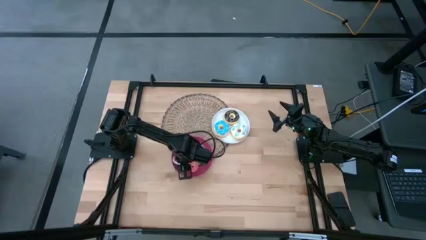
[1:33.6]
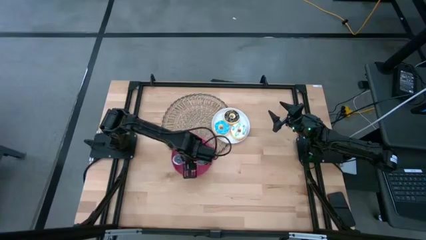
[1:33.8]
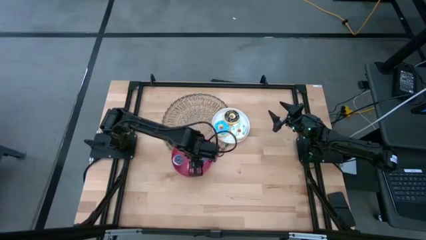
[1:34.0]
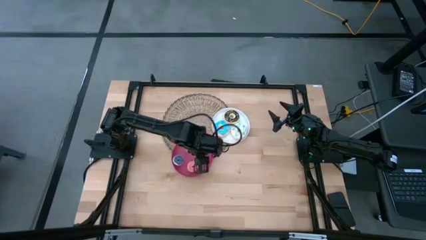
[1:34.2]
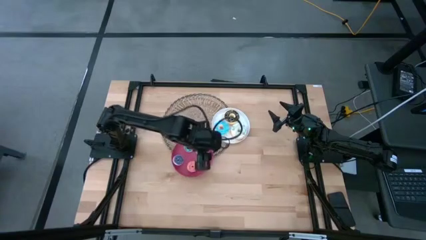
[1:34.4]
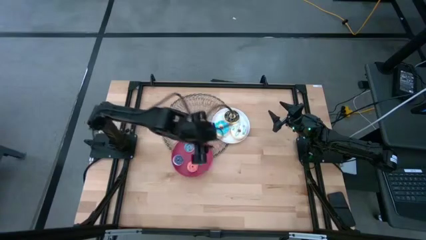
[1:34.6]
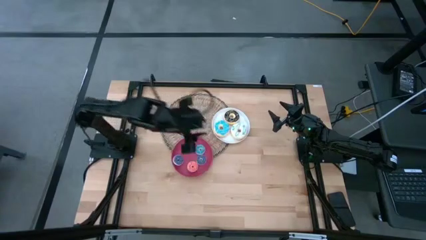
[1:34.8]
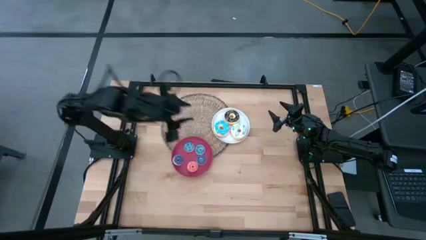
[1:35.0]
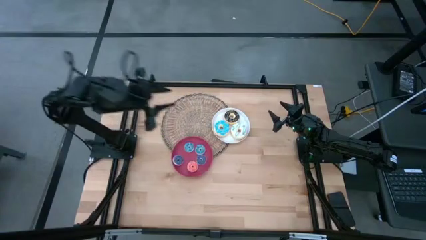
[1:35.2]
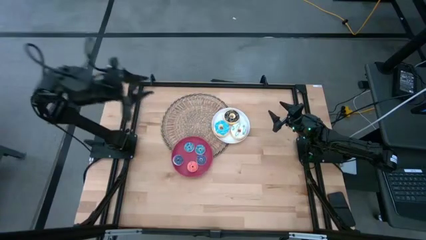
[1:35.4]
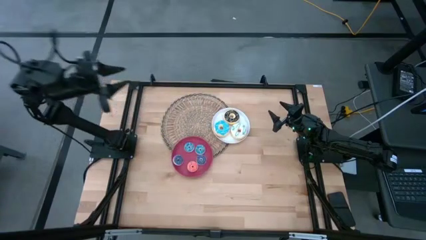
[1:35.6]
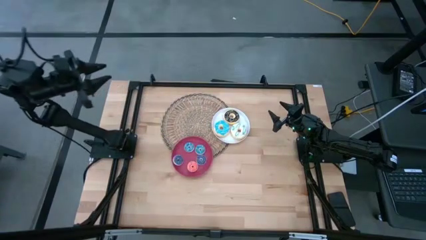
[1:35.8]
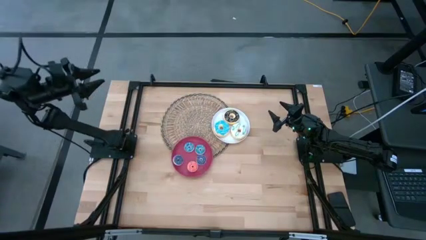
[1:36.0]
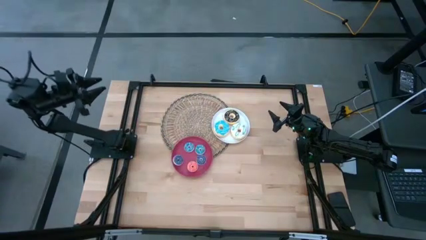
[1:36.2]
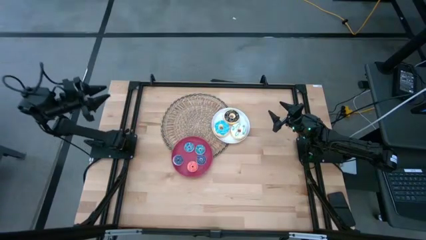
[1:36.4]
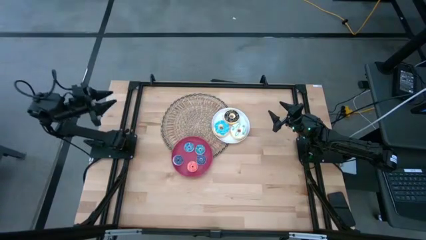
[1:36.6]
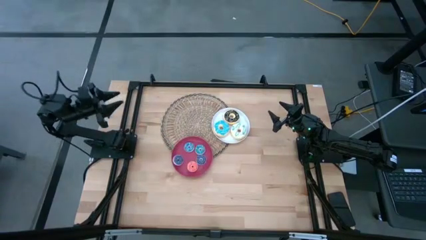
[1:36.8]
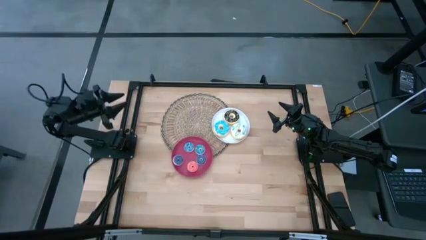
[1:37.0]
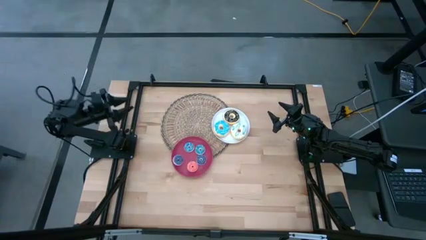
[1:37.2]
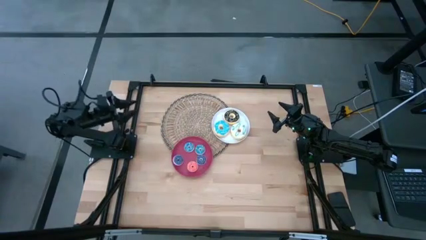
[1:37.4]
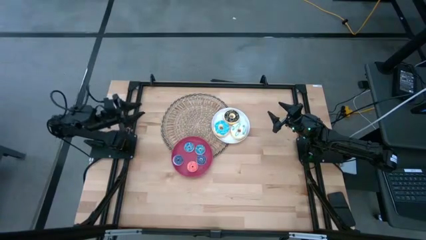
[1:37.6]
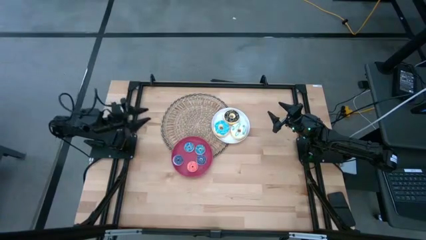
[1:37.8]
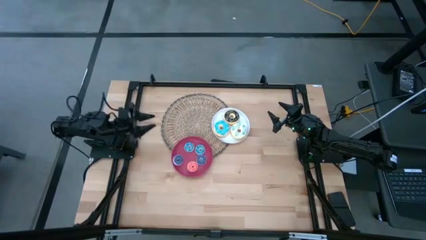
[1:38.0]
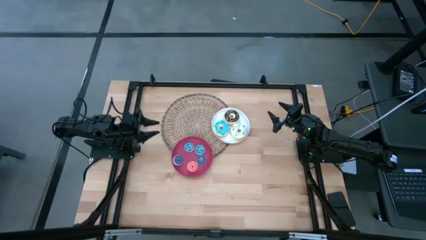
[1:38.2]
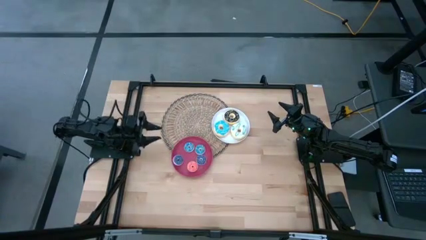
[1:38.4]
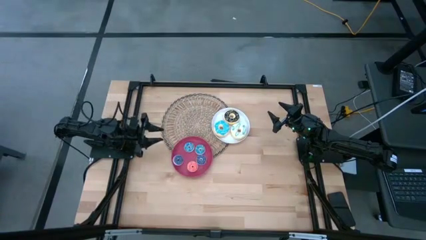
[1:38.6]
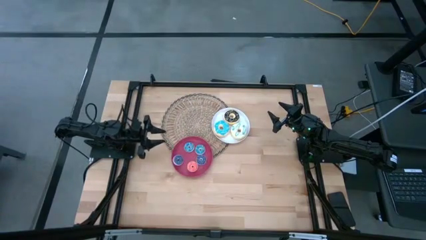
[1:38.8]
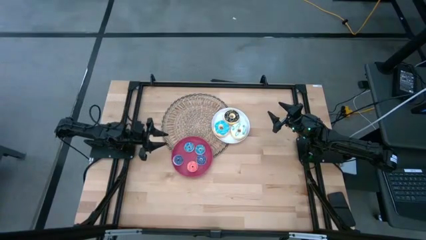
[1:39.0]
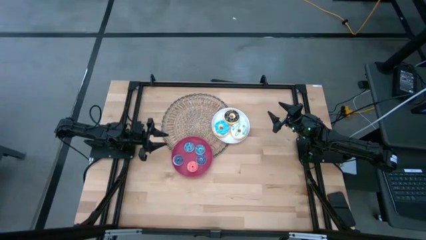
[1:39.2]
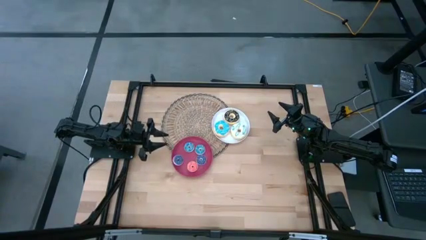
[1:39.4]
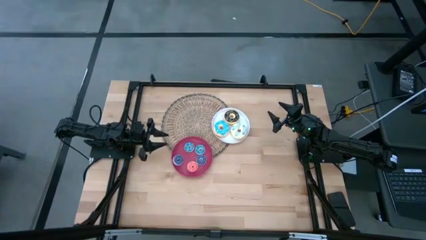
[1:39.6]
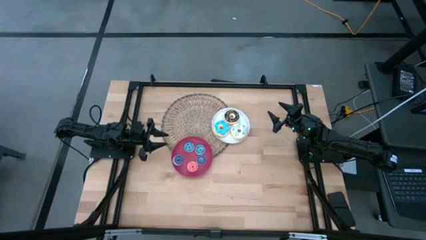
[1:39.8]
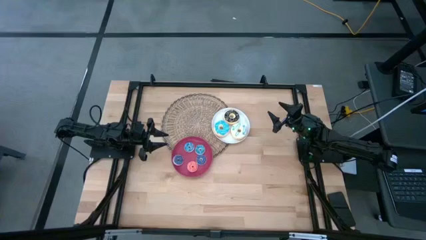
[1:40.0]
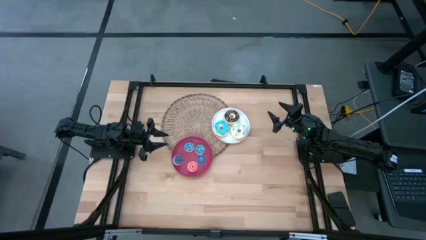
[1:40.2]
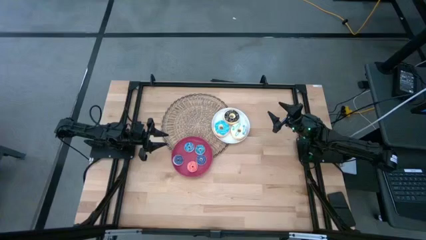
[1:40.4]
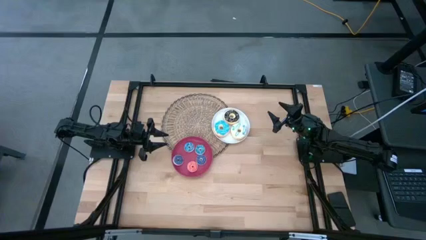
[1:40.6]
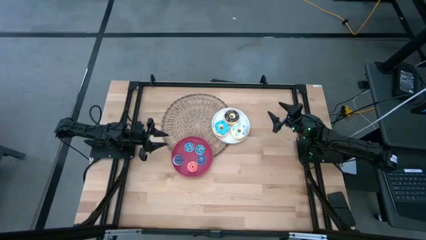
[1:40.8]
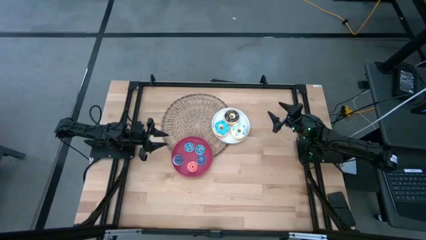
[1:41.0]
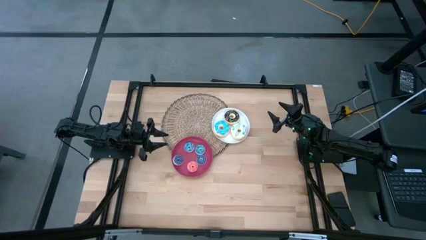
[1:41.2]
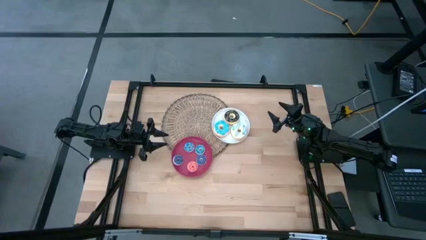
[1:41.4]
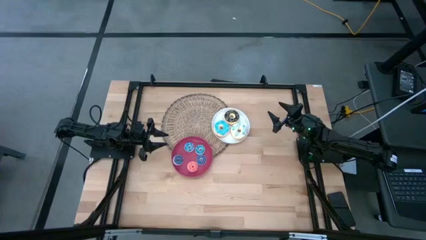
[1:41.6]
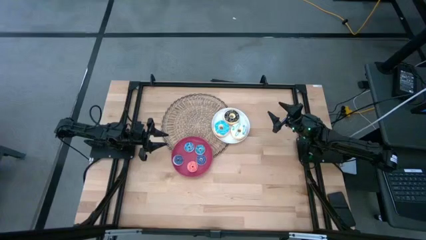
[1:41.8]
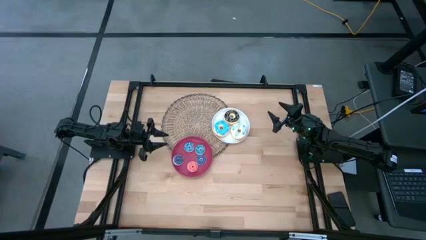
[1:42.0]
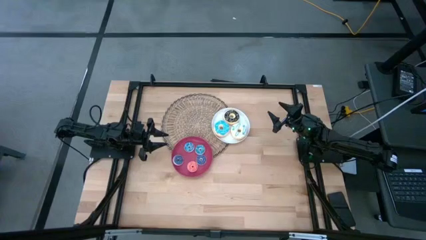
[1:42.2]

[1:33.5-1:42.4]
Task: Pick & Place donuts
Return to Home Position

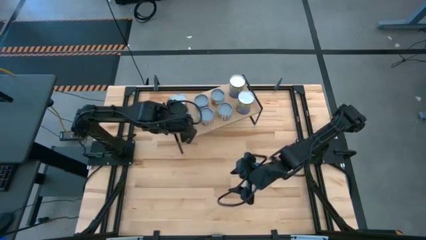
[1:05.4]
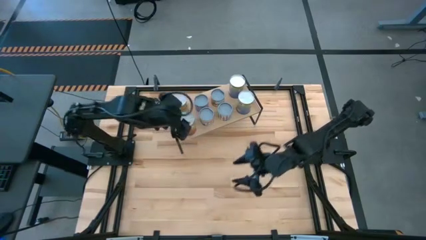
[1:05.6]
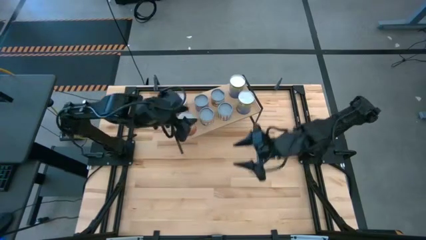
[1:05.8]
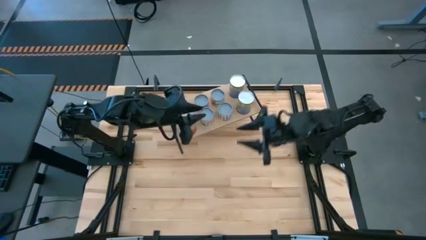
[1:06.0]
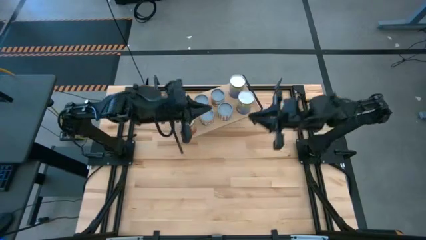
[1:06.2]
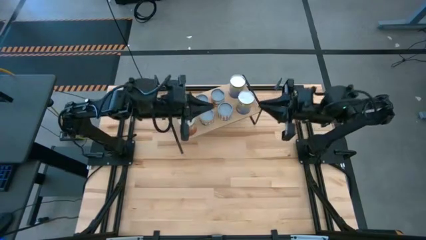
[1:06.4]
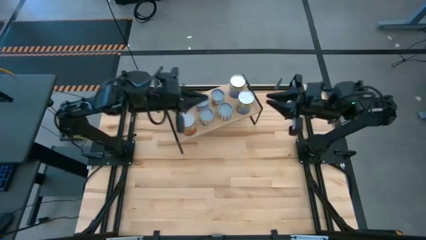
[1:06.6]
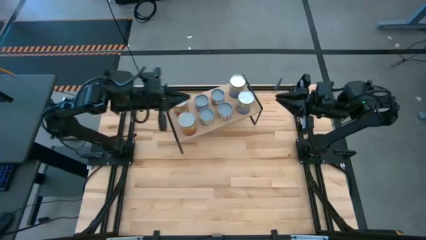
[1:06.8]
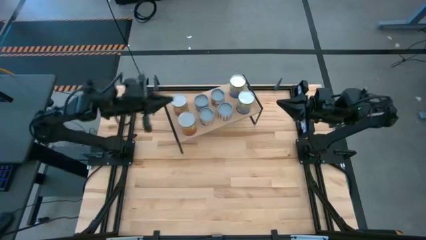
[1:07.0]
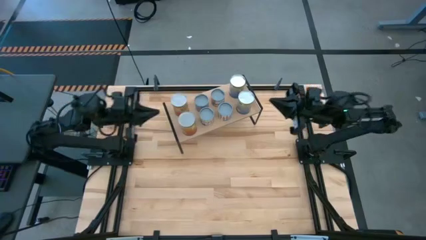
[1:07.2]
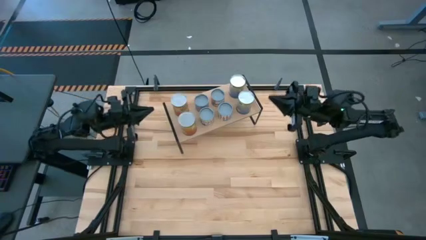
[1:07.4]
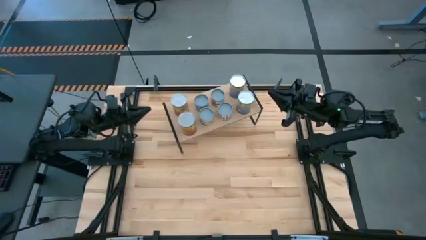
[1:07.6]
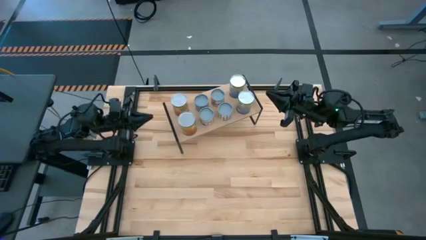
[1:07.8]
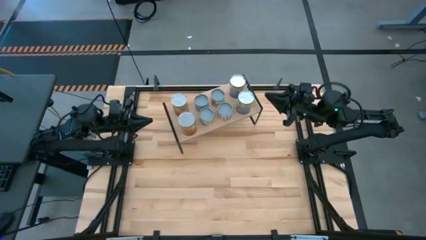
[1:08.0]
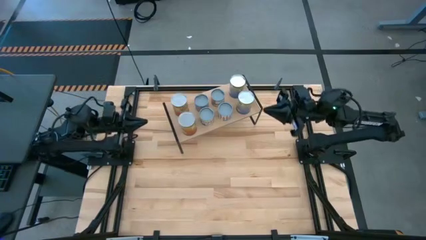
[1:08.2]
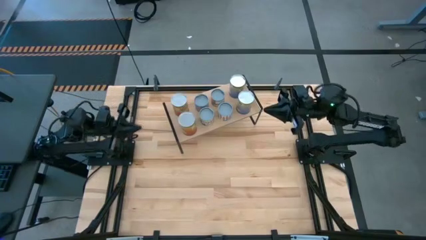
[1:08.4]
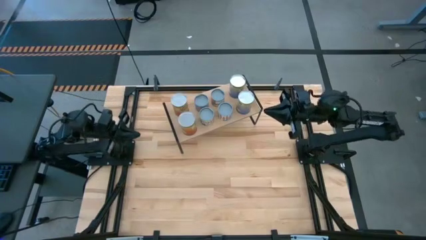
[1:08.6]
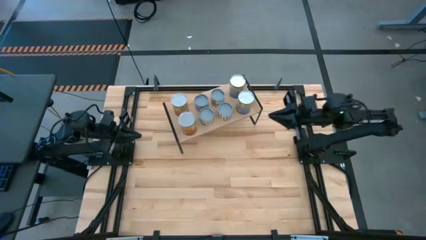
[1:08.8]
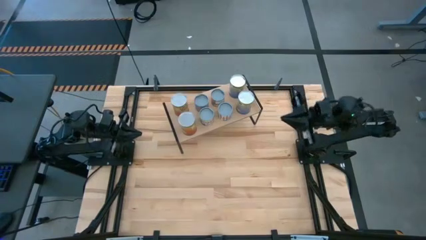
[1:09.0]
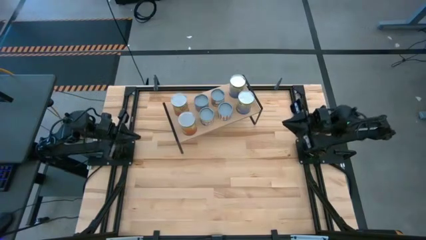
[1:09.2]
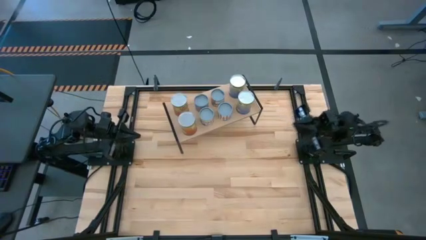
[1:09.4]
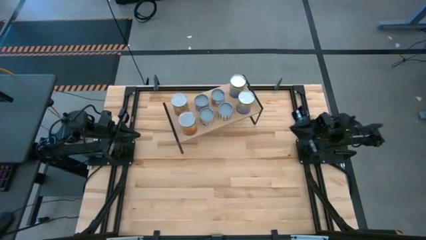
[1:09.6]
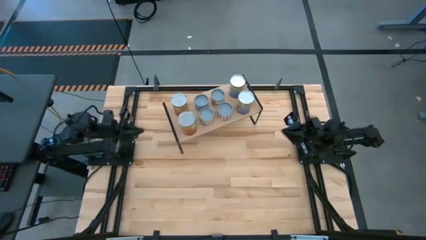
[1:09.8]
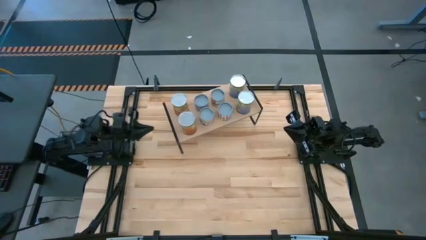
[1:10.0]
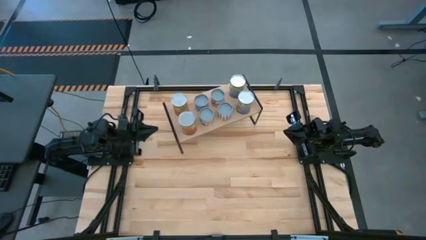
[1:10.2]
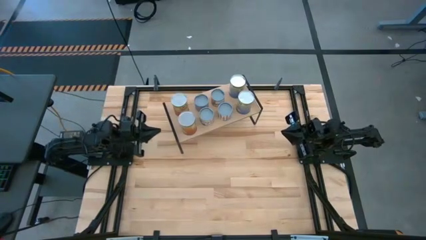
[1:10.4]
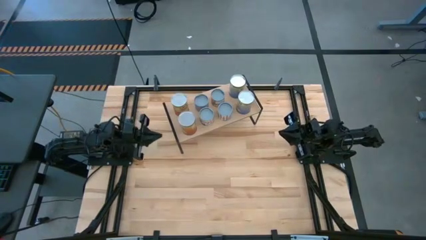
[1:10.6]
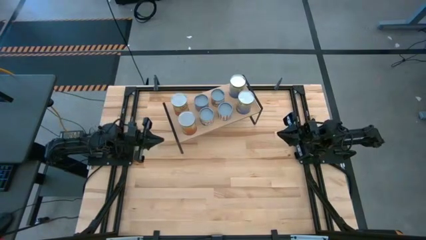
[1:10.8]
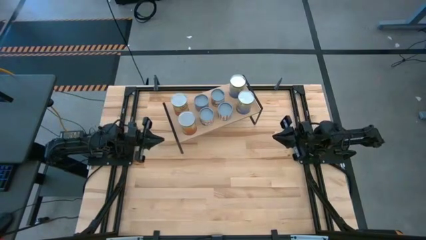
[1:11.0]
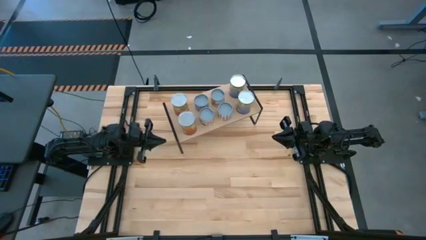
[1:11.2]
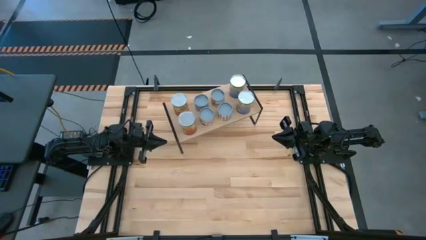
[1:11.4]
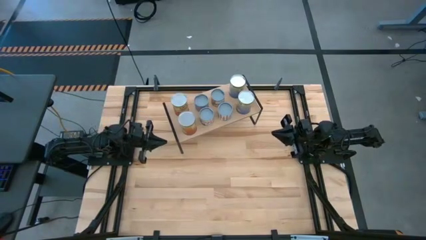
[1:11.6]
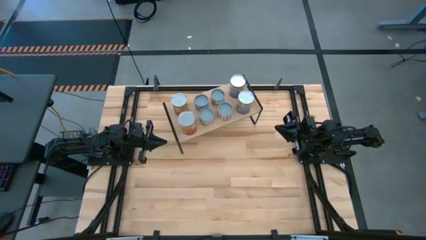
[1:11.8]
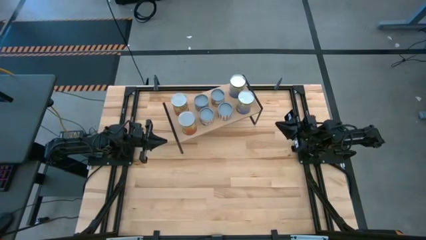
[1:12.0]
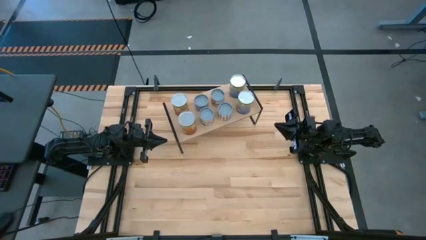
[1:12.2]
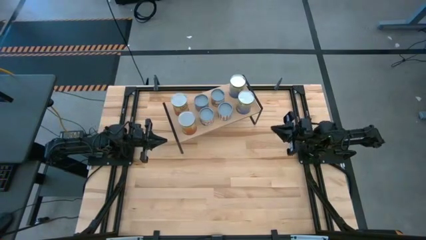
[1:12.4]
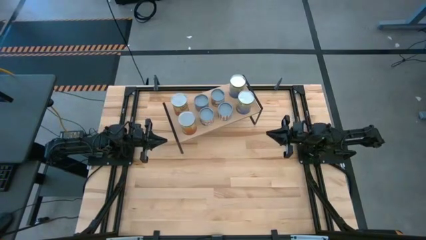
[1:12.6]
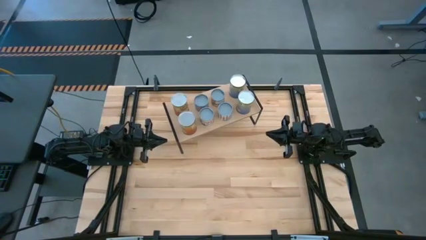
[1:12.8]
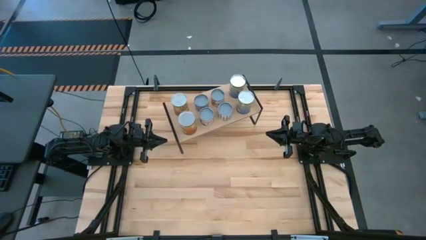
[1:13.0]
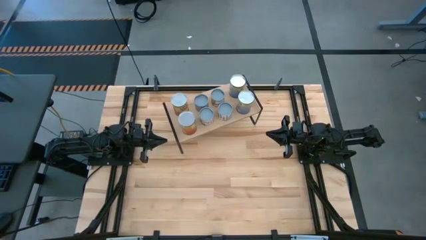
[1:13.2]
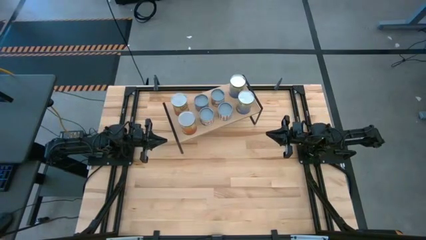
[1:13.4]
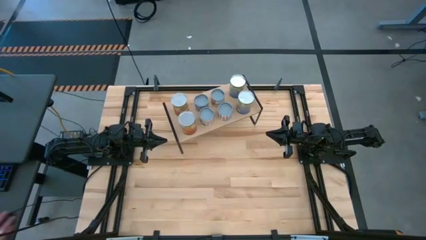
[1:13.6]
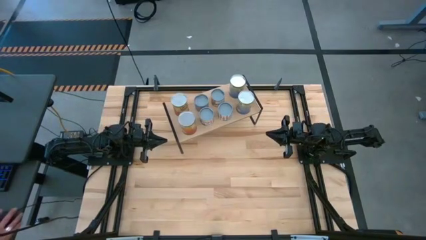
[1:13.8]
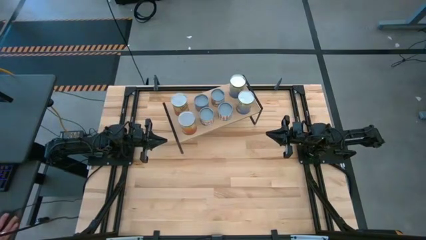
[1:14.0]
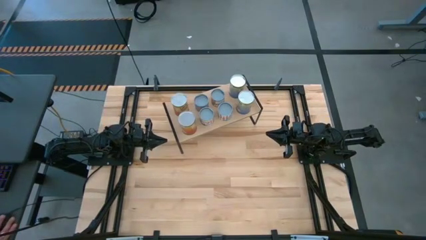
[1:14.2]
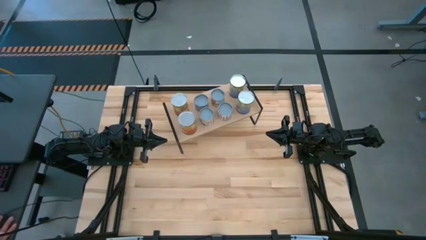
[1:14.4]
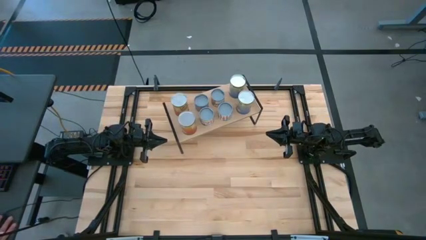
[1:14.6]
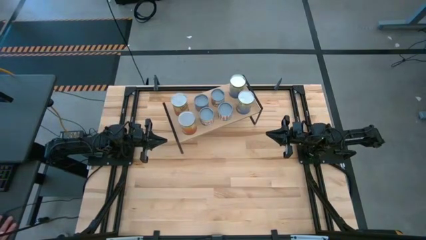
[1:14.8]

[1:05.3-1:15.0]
Task: Pick and place cans onto a shelf
Return to Home Position
